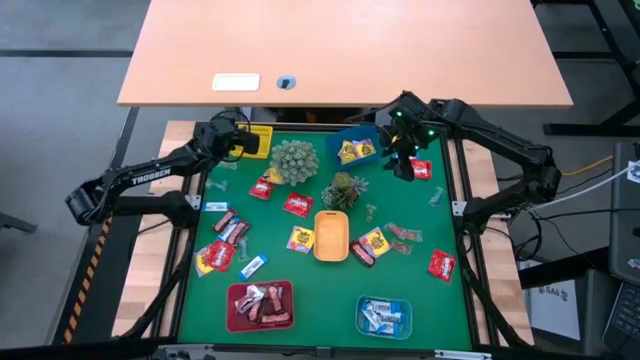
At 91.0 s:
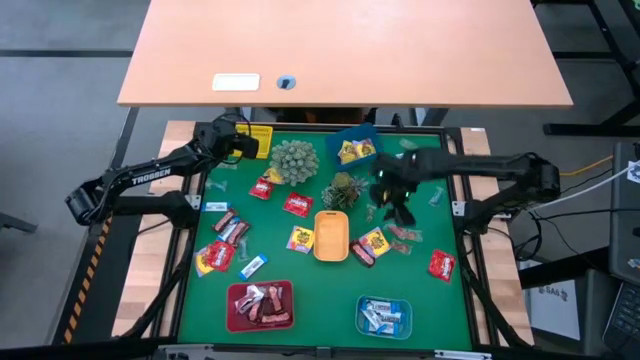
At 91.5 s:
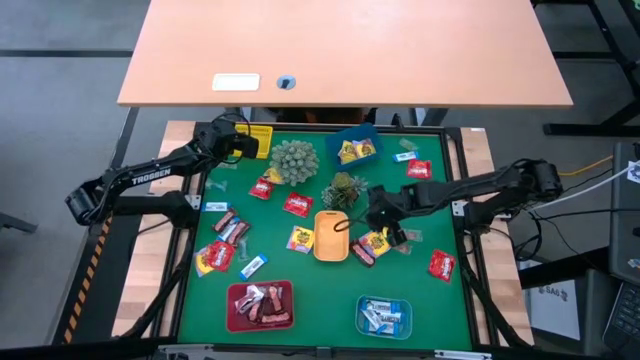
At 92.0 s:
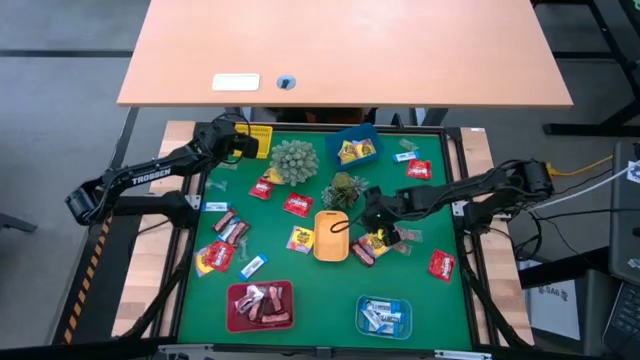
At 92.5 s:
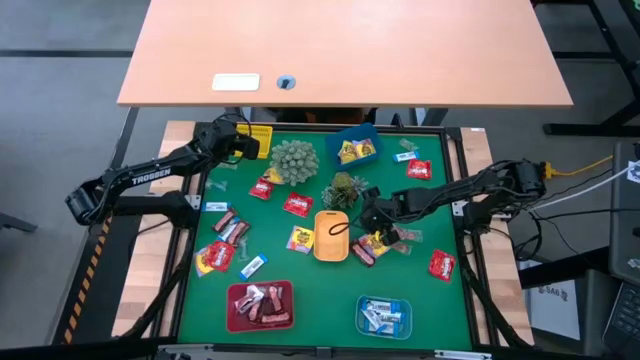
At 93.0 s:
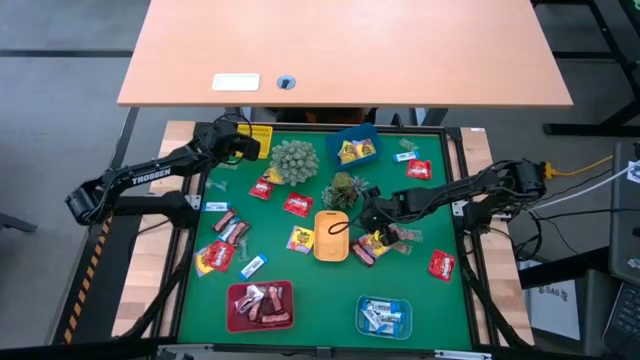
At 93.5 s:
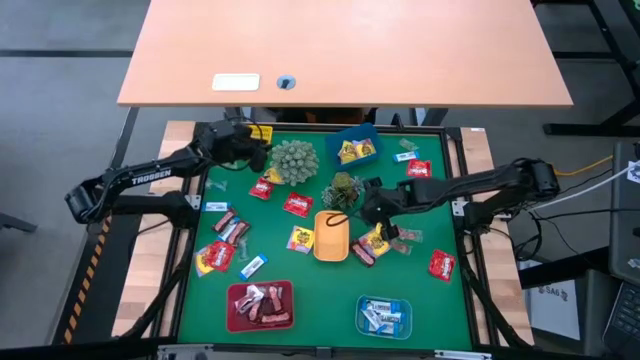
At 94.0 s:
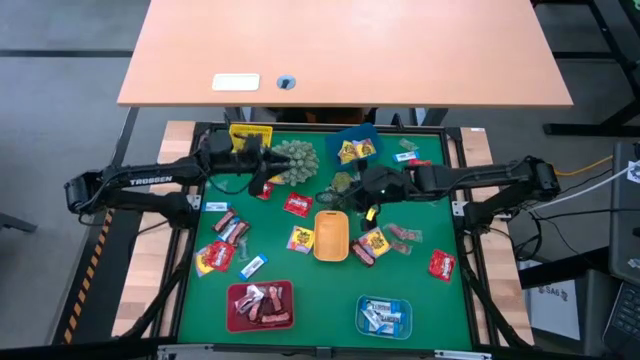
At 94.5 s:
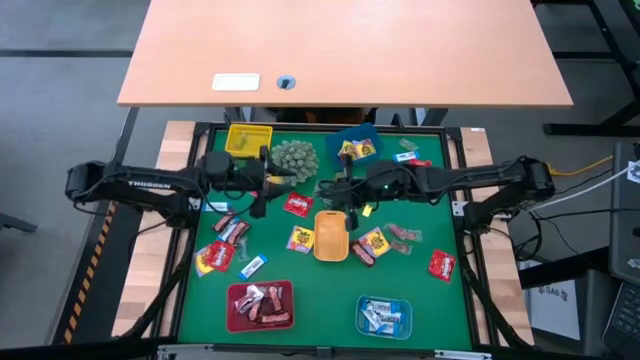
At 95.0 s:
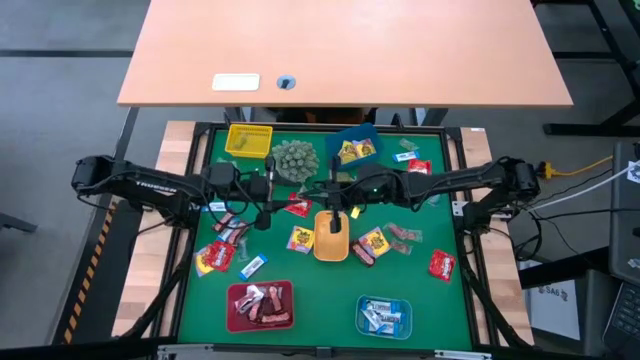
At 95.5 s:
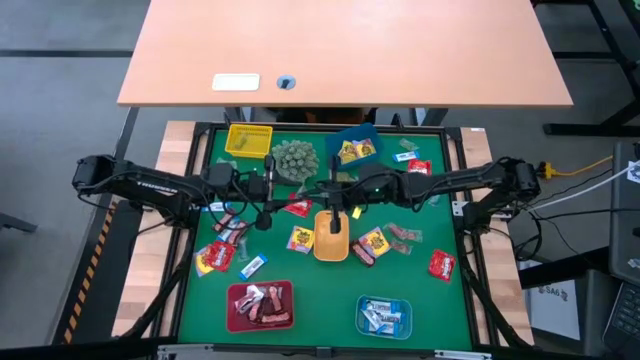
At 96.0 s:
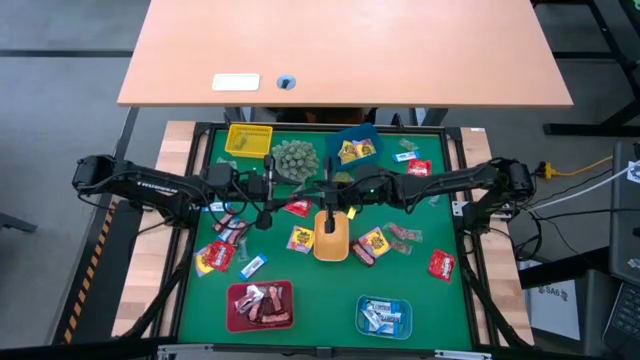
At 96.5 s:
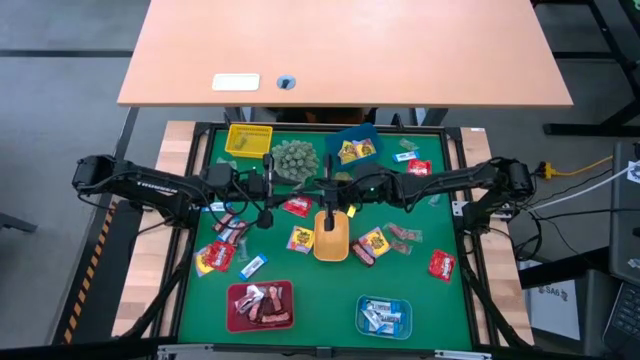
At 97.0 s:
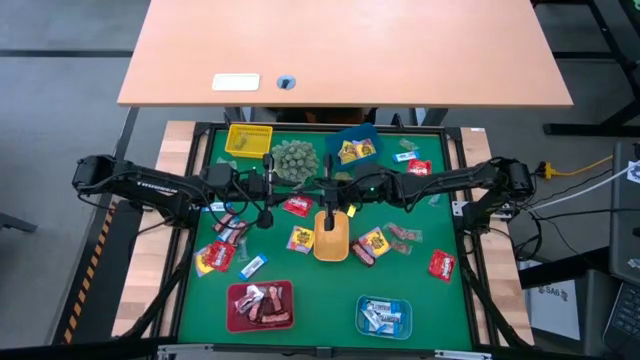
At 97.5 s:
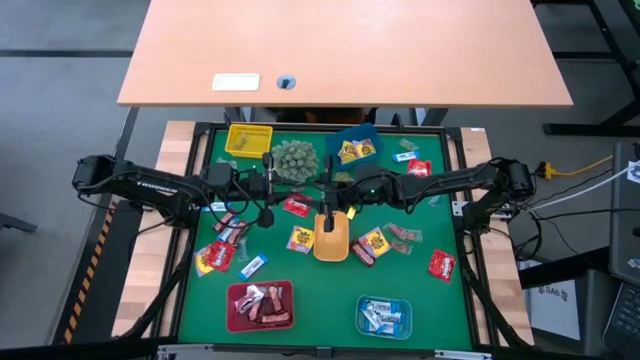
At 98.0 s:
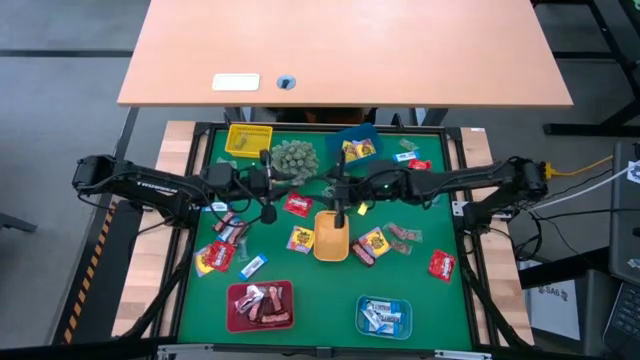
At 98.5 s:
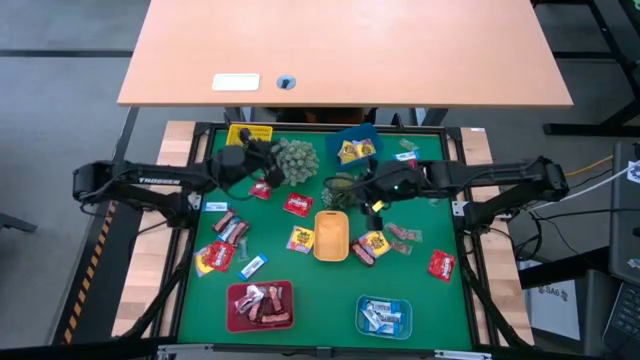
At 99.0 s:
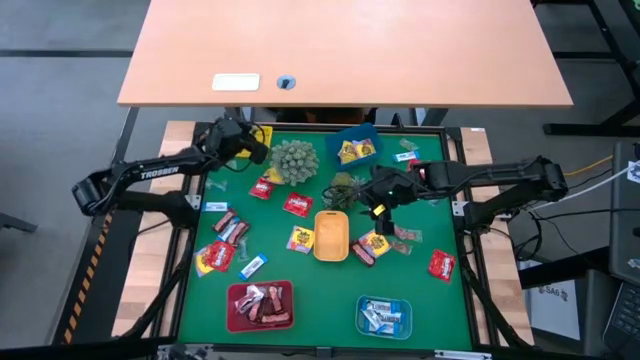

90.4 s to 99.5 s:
Task: Sort candy
Put the green gummy into the yellow bin

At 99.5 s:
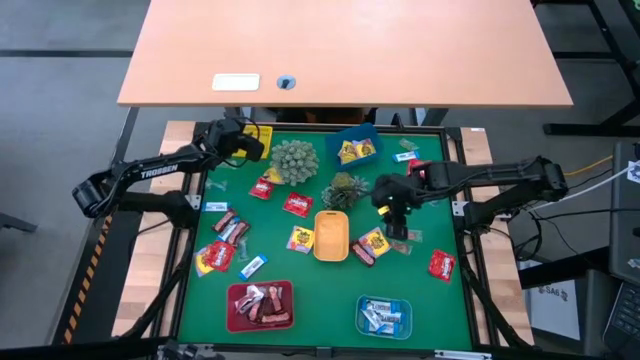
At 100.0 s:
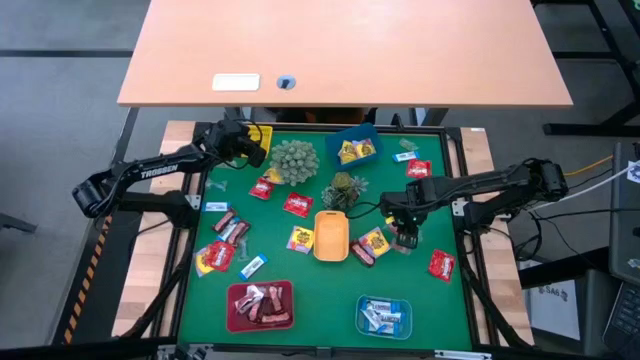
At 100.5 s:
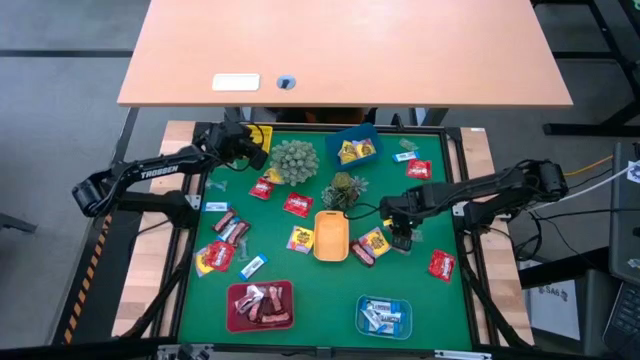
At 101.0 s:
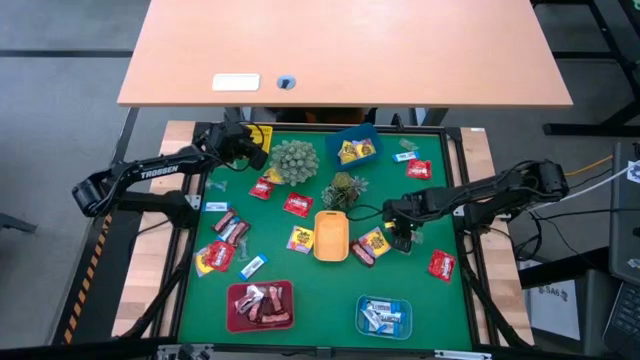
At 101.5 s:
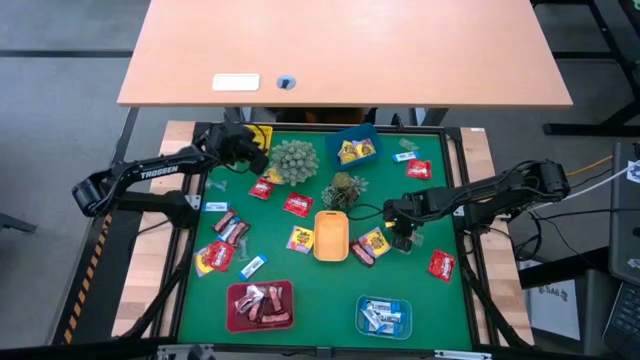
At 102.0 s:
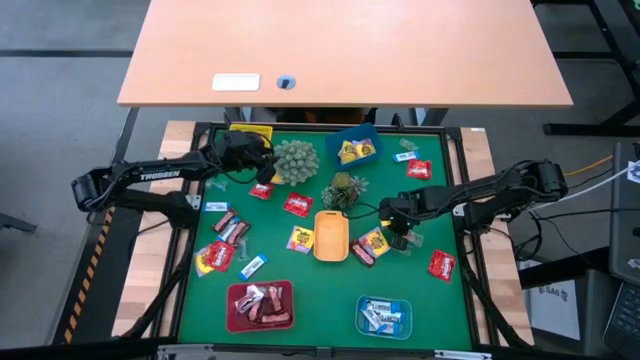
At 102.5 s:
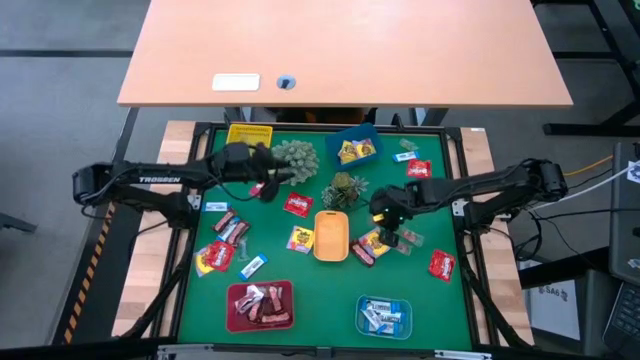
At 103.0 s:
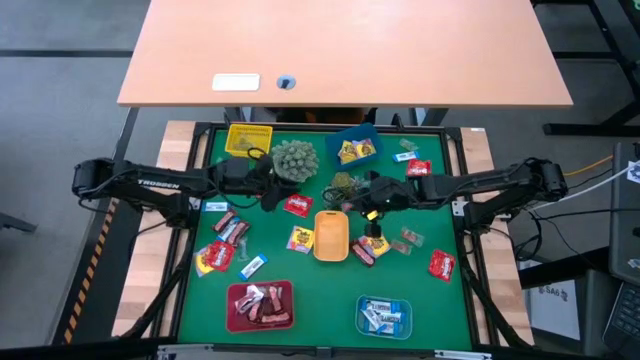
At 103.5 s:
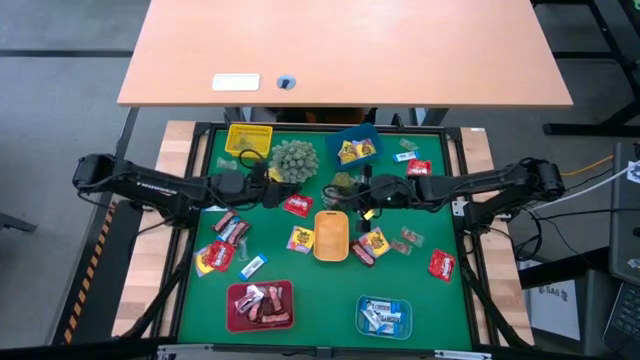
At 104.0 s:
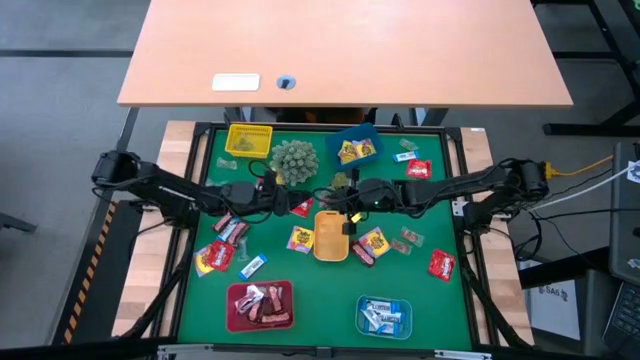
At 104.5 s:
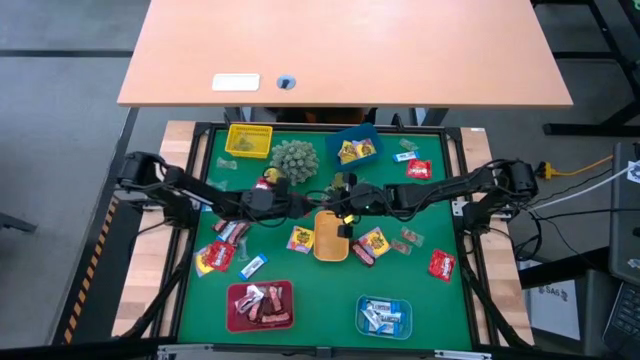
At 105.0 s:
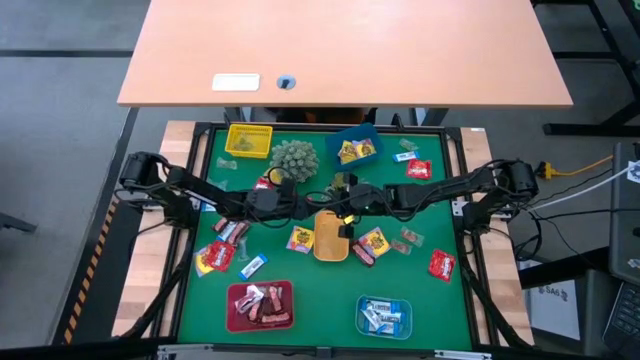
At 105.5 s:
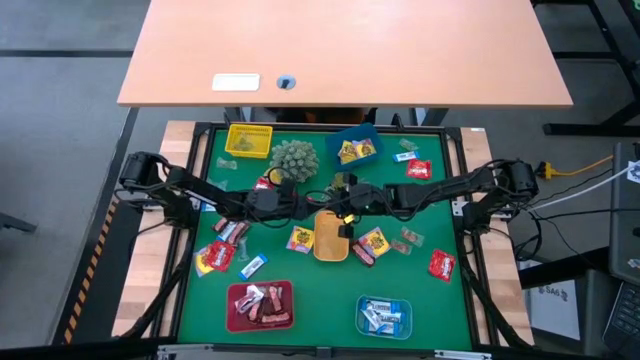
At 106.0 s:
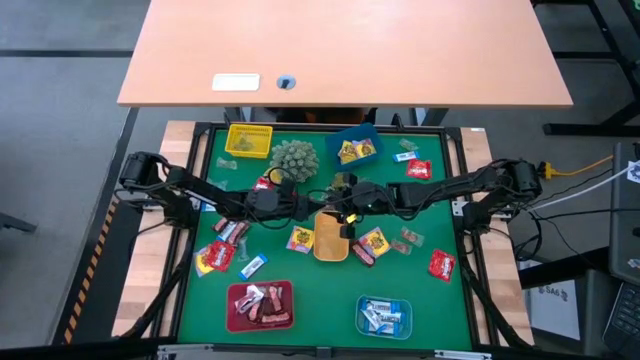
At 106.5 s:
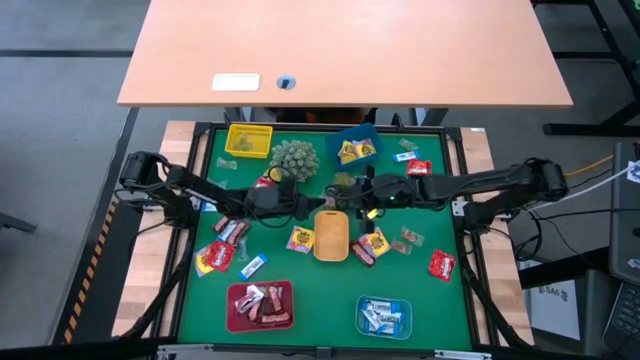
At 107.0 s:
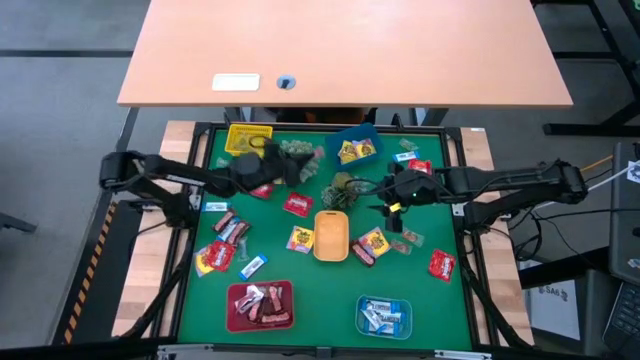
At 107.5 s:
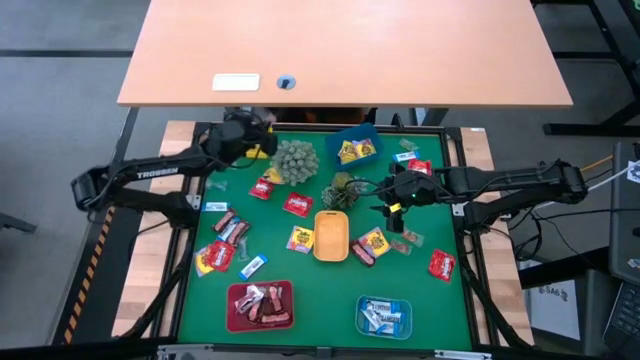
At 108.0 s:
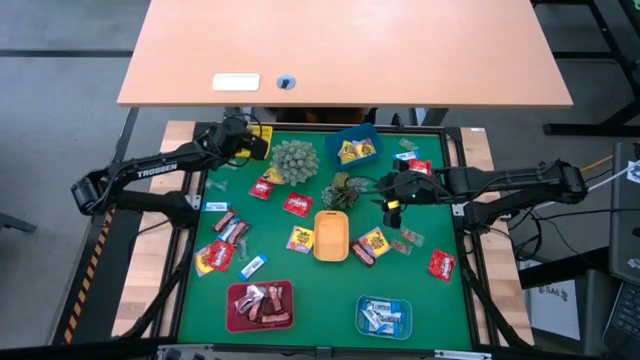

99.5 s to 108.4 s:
Put the red gummy into the yellow bin

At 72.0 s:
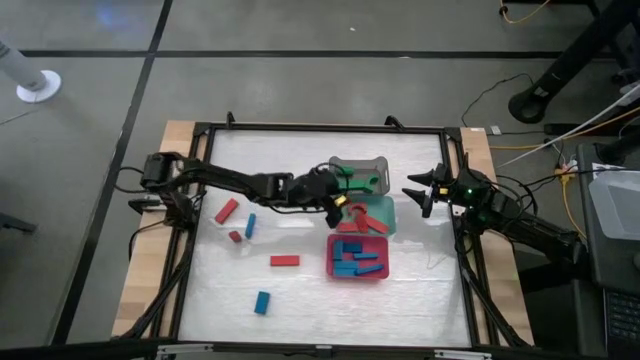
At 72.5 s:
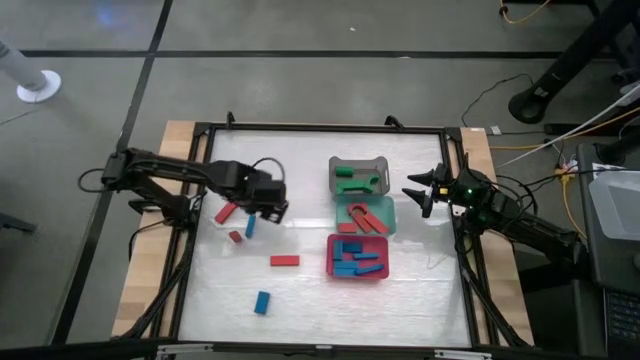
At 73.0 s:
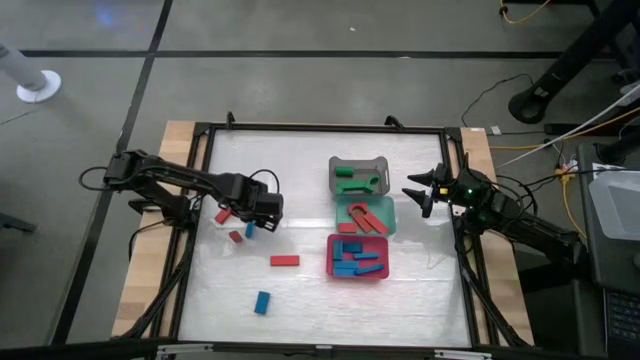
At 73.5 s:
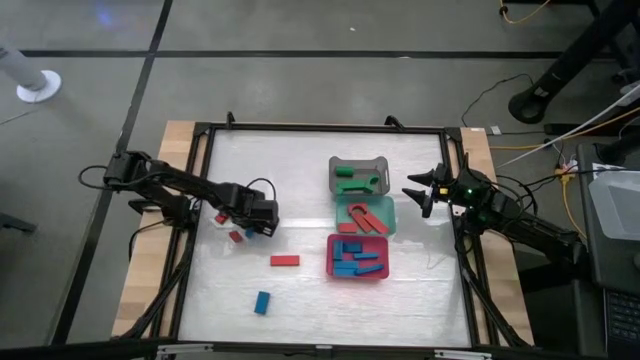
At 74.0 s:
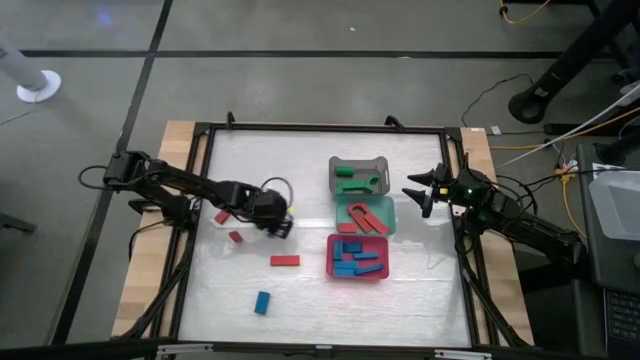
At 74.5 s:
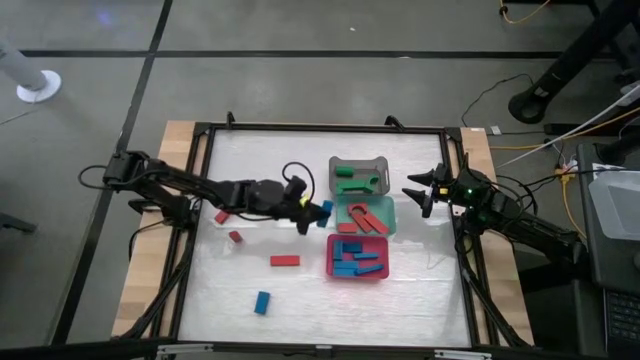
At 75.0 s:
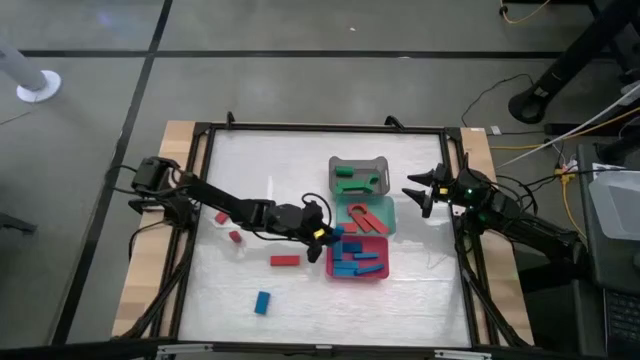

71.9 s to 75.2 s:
Task: Sort blocks
Put the blue block into the red bin

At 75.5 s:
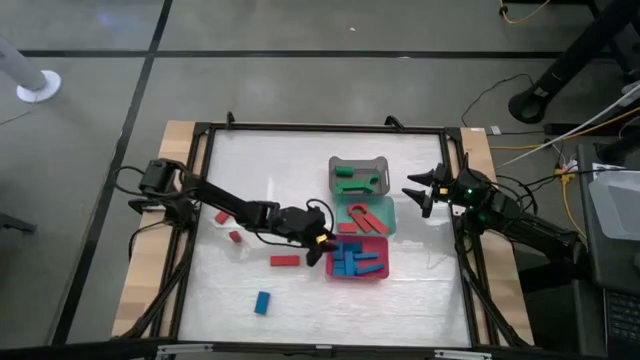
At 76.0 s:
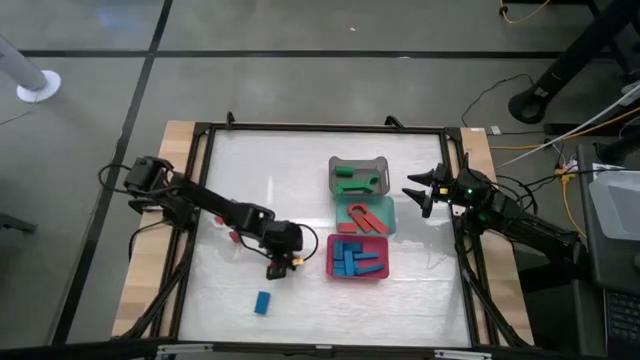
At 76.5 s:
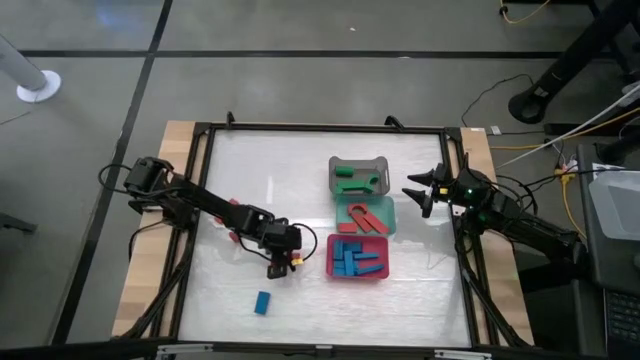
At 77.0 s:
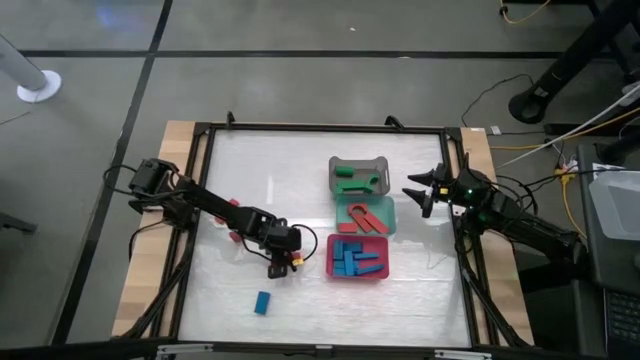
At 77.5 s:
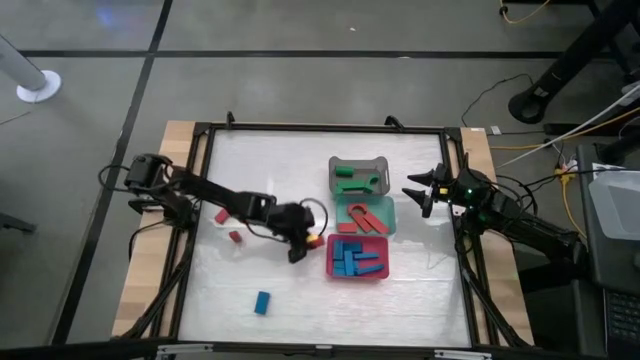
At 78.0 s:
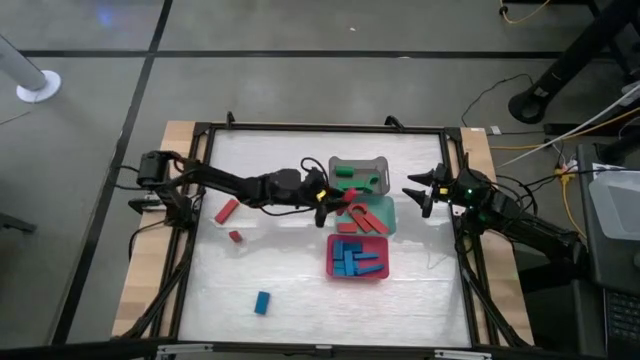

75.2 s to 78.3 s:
Put the red block into the green bin
